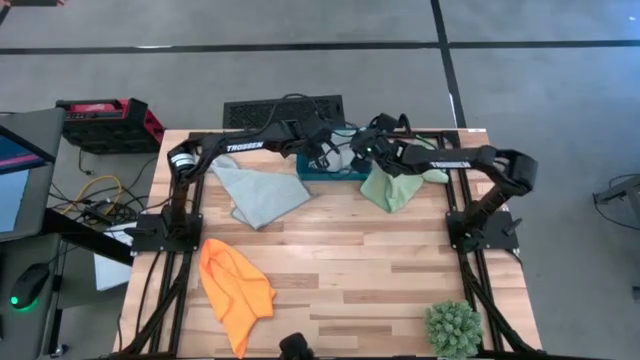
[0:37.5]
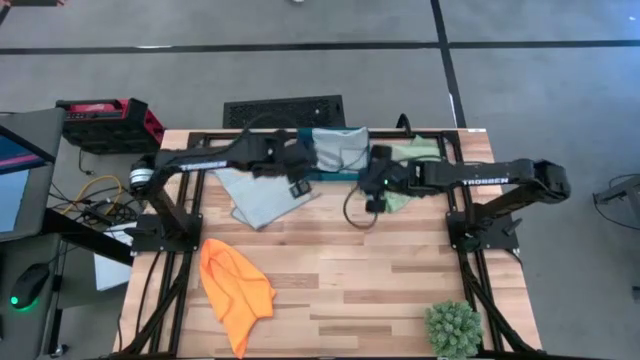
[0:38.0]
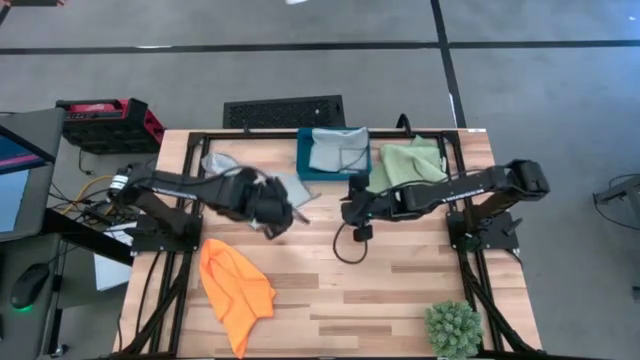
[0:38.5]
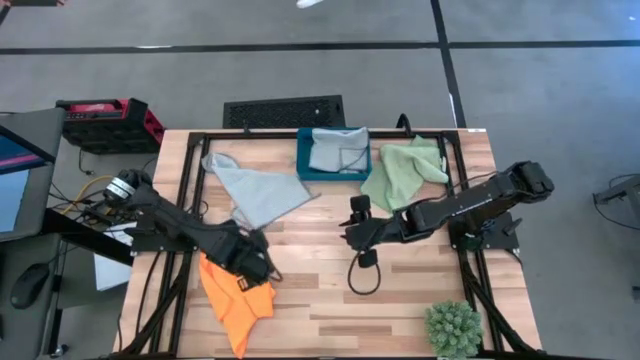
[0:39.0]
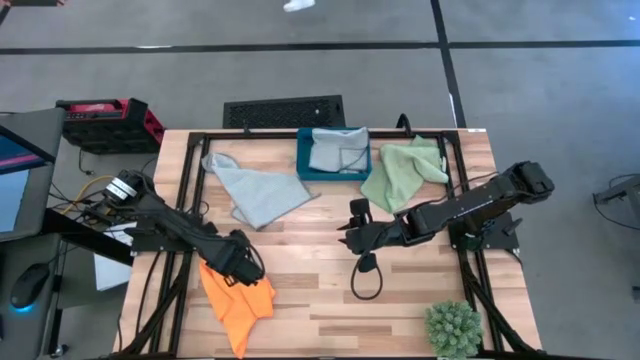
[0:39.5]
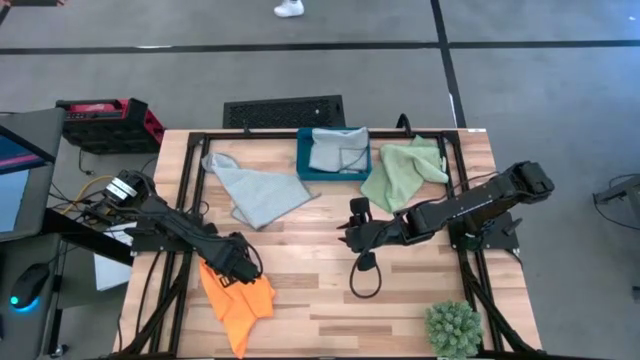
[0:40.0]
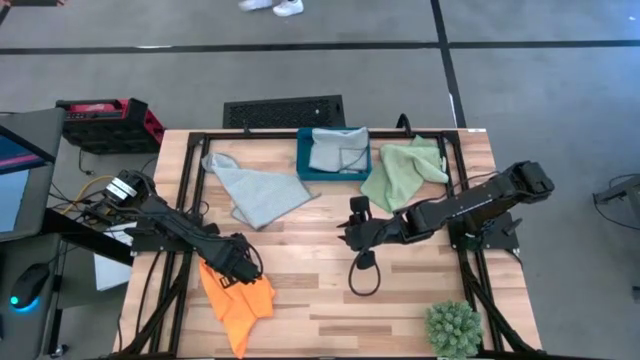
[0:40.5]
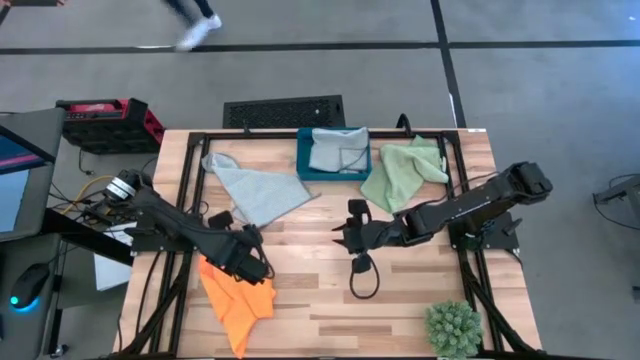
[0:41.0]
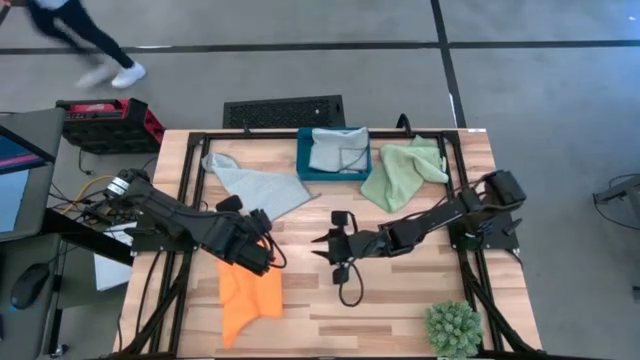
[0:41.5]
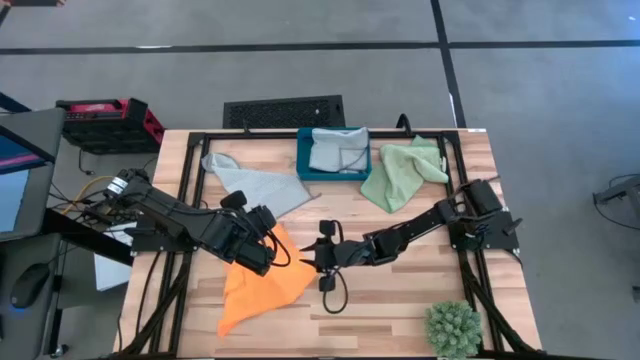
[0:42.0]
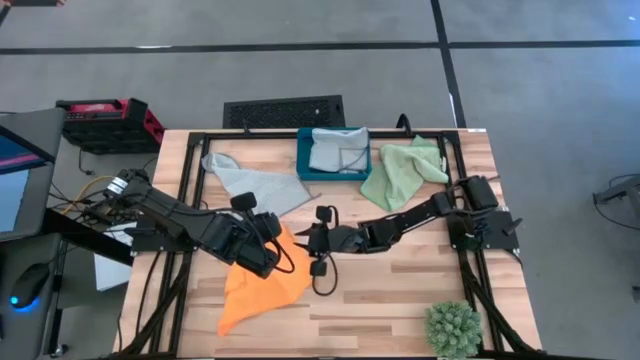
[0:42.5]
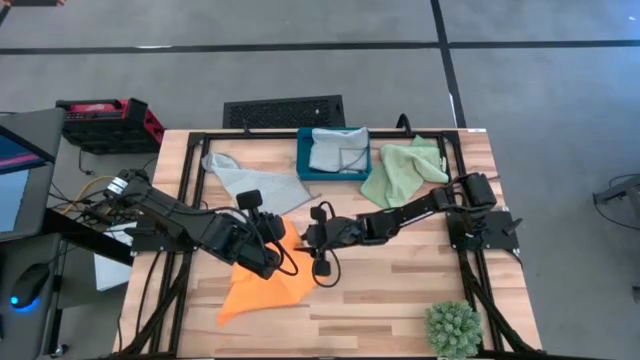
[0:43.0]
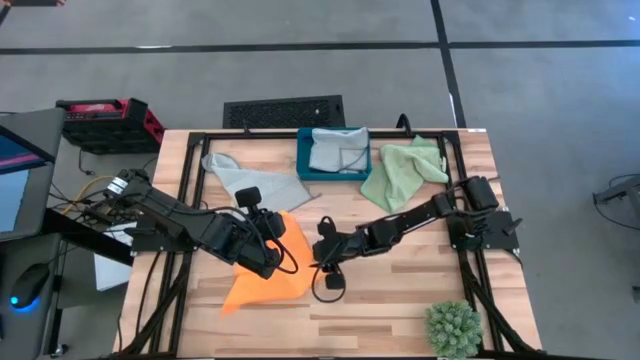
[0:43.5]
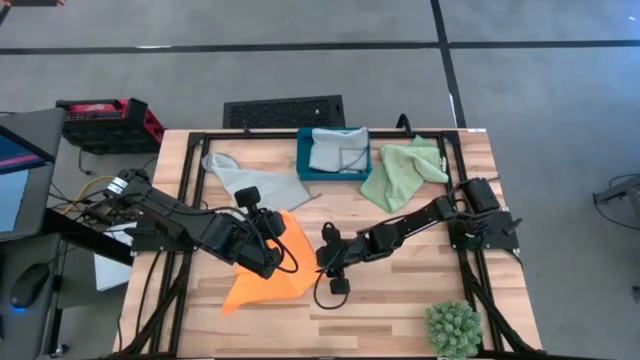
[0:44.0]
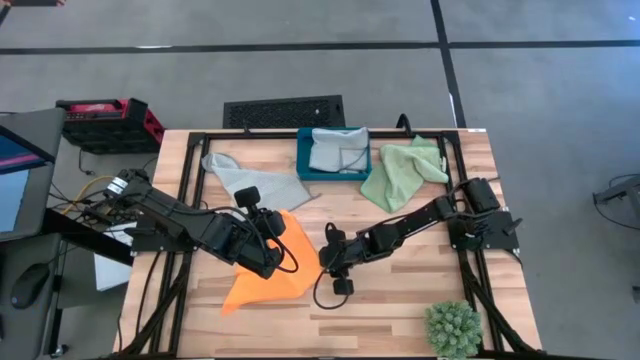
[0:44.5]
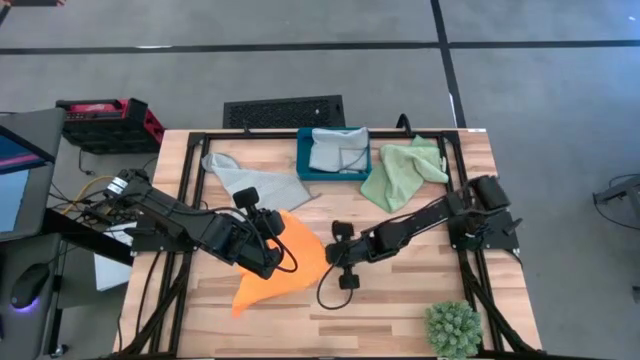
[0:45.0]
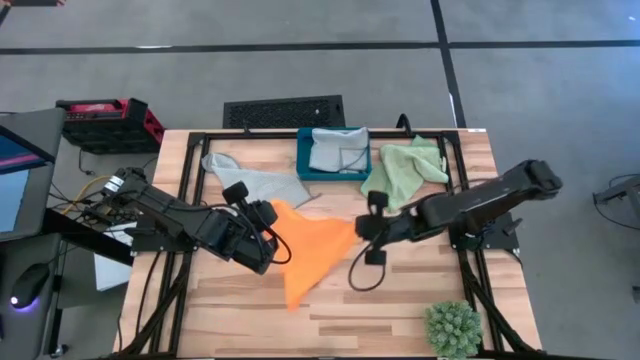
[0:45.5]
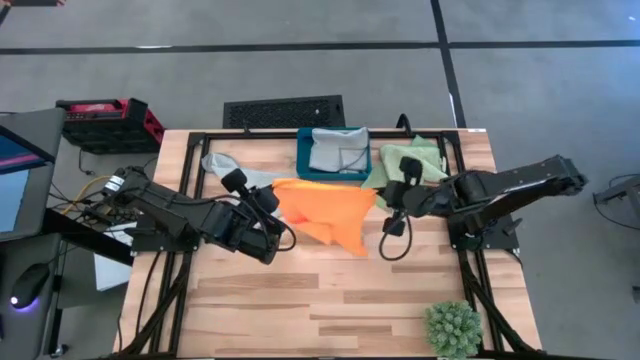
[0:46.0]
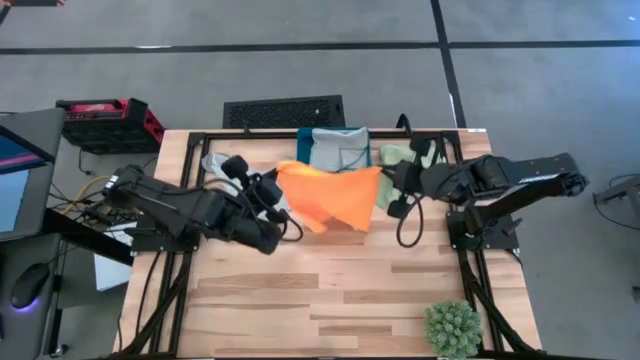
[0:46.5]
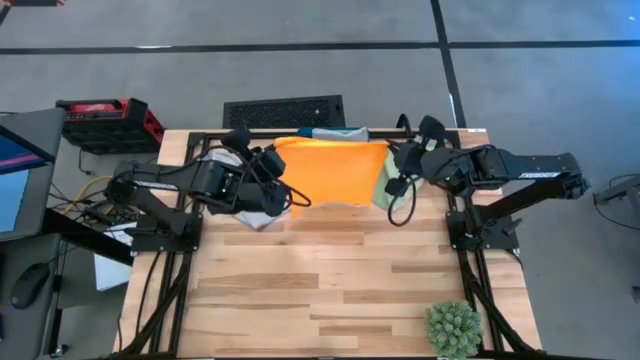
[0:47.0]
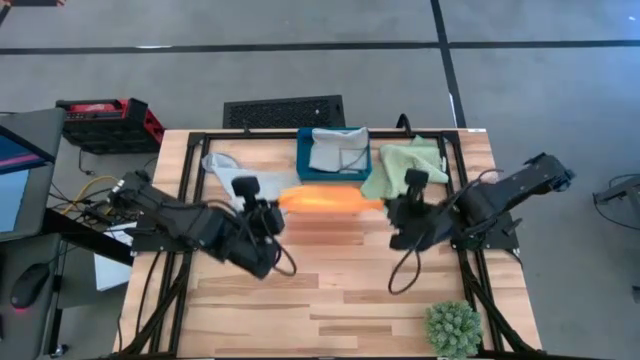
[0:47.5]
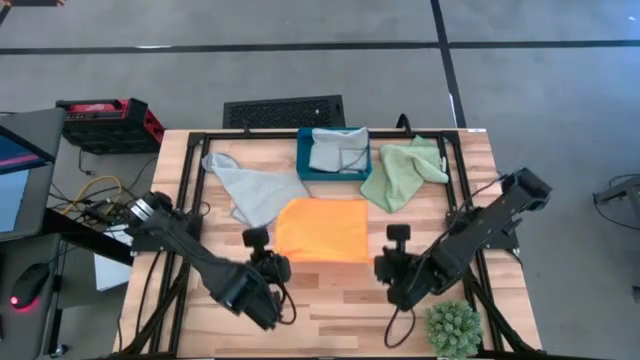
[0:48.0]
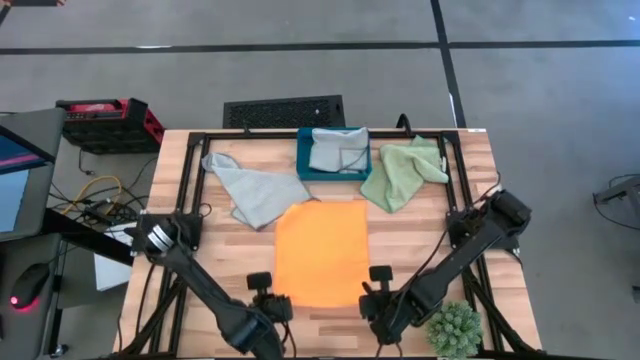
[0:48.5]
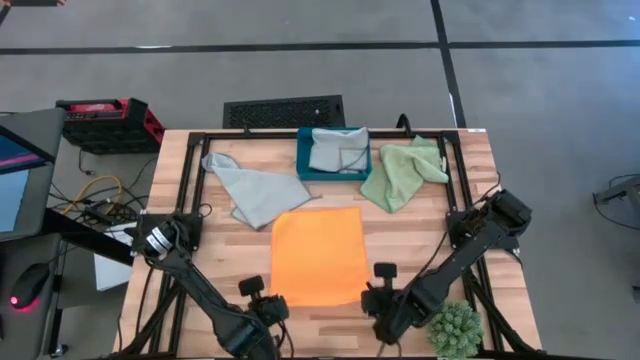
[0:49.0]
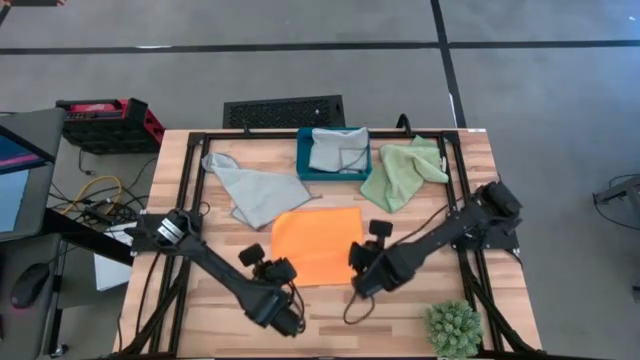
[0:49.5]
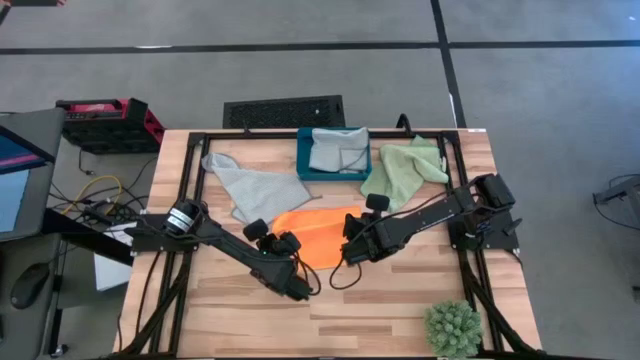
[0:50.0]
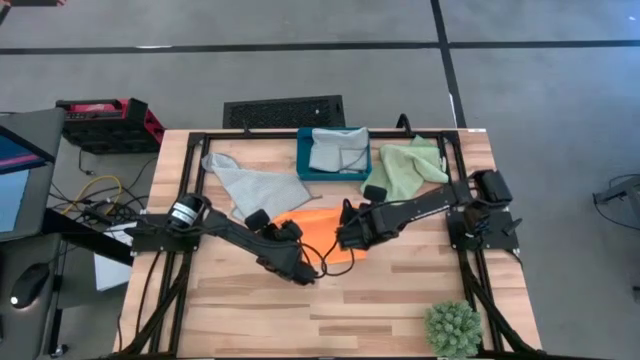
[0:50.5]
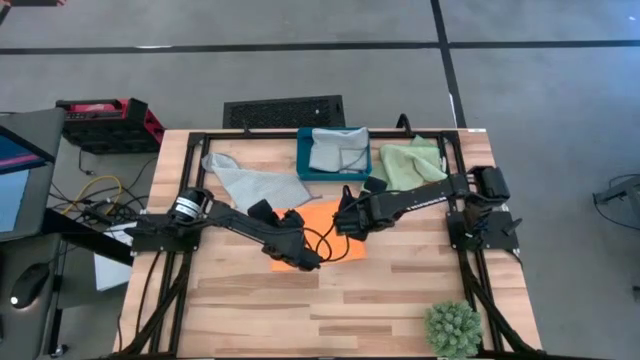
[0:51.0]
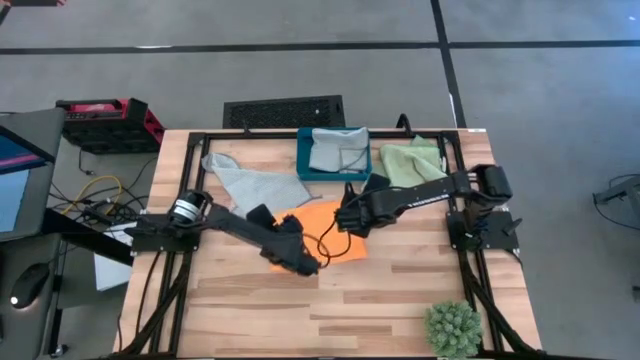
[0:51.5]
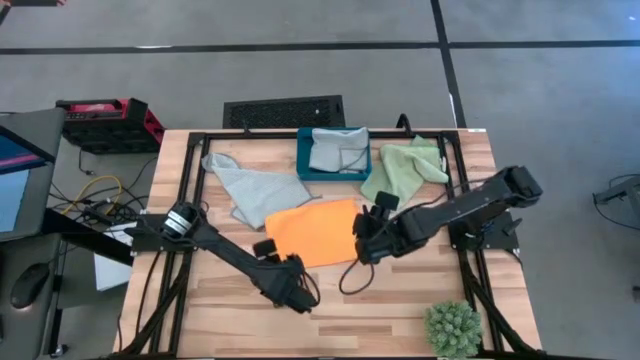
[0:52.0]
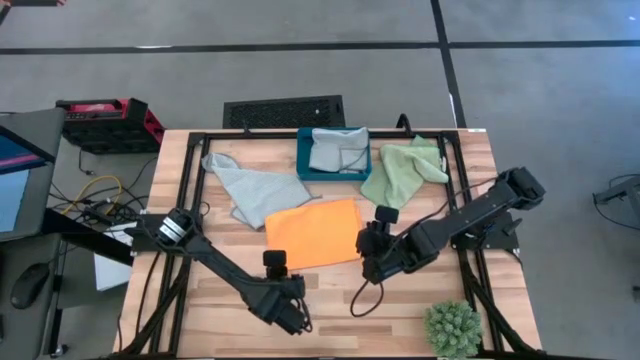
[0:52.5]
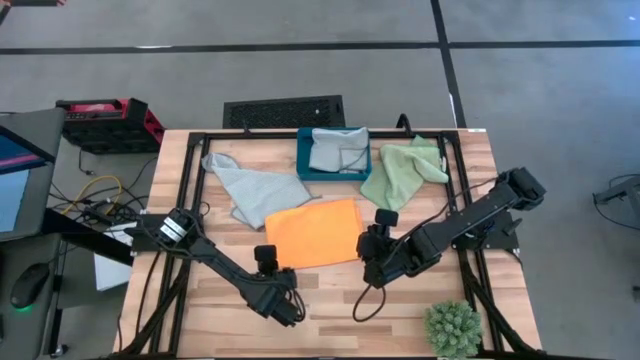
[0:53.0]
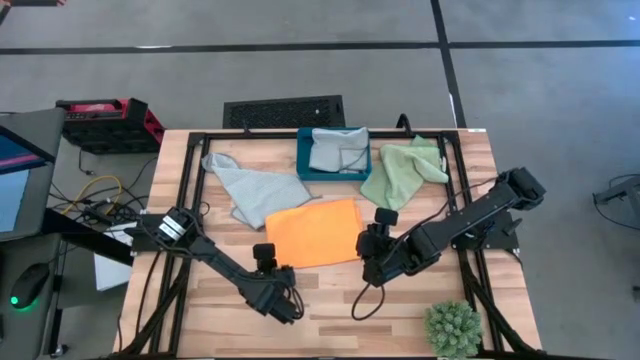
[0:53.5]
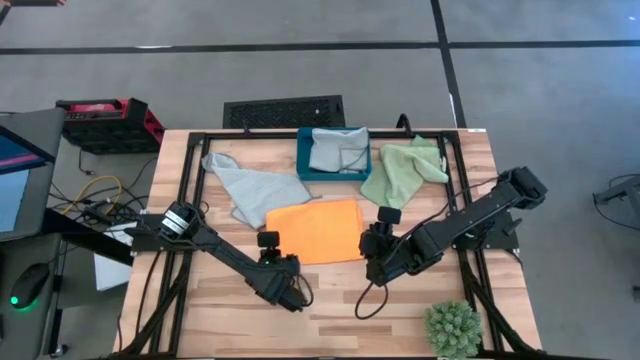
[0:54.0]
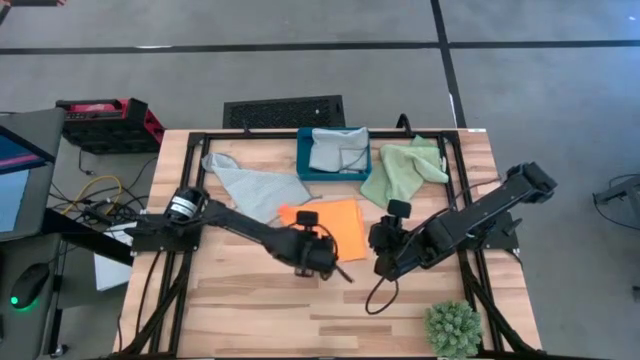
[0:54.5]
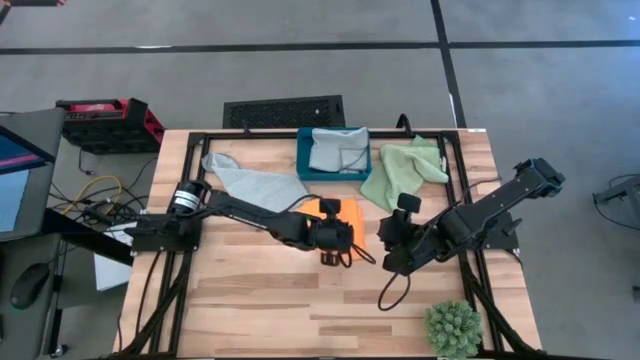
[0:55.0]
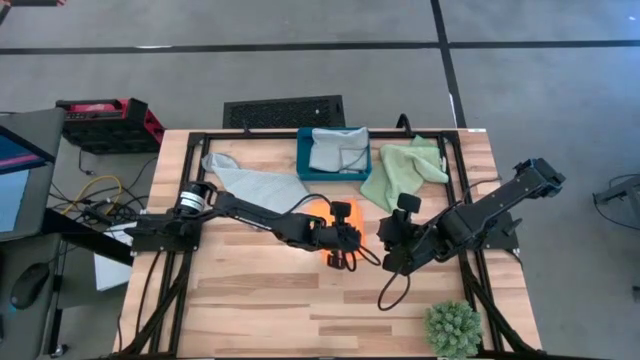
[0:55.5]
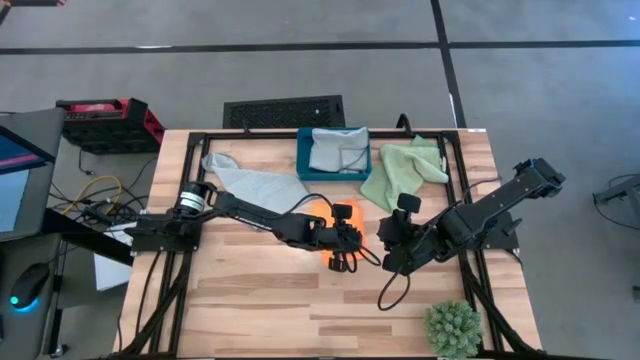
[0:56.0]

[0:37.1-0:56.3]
Task: Fold microfiber towels
Fold the orange microfiber cloth

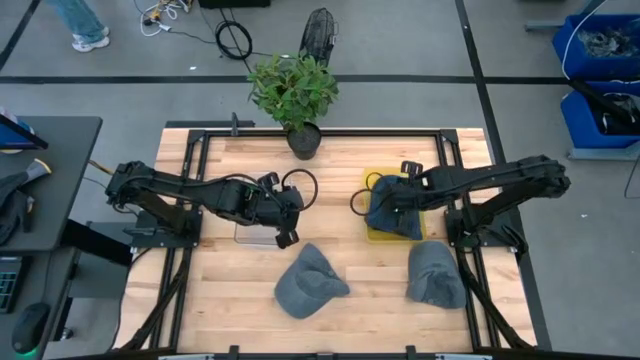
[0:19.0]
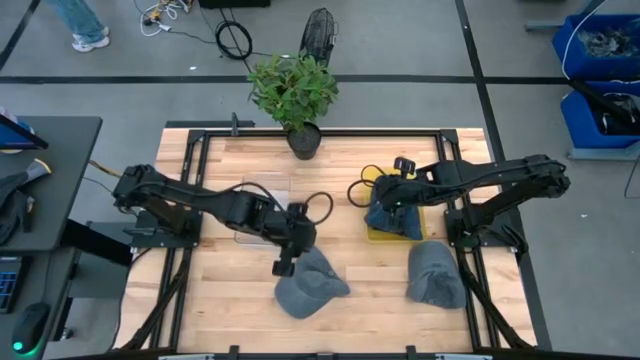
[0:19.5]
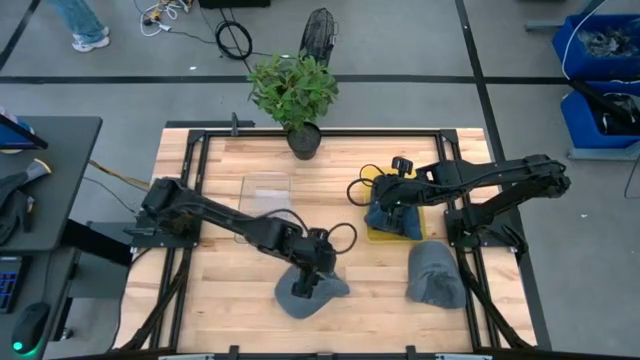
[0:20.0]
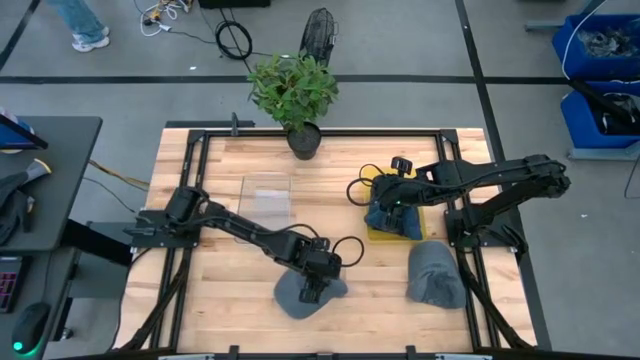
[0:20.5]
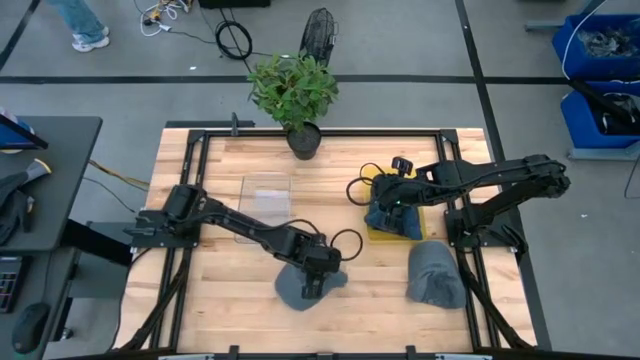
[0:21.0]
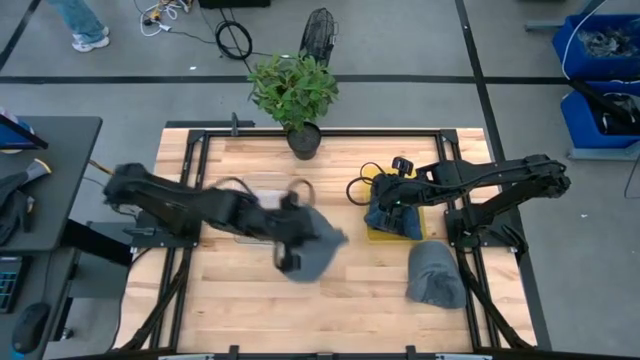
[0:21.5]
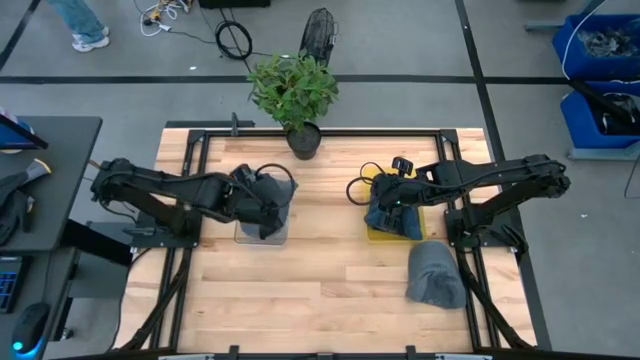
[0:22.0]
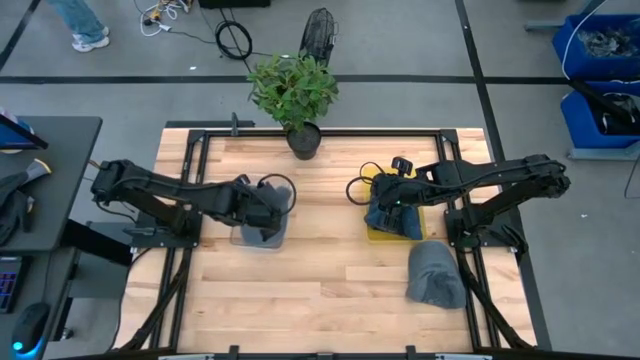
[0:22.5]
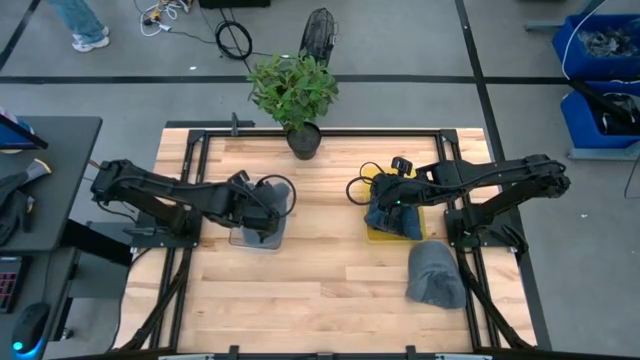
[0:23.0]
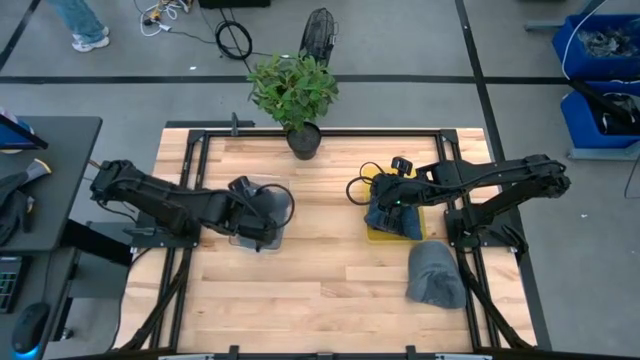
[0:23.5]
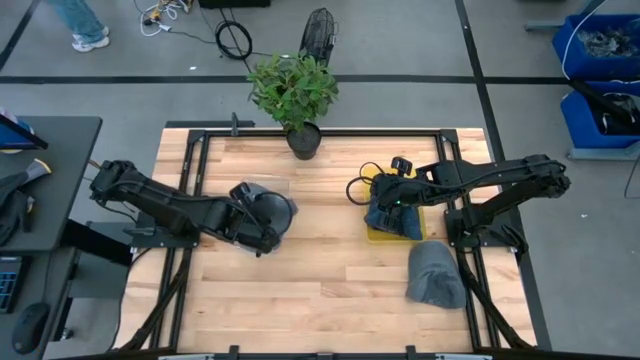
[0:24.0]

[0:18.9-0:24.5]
Task: Pick & Place hat
Put the gray cap into the transparent bin
